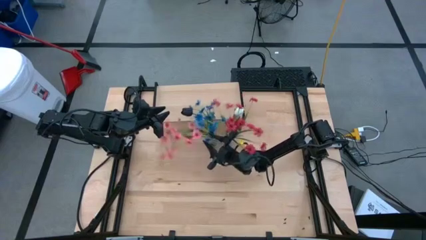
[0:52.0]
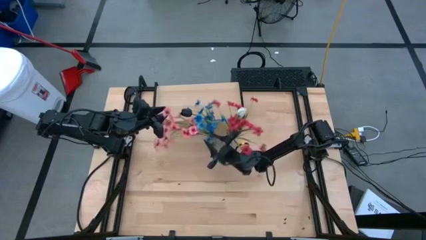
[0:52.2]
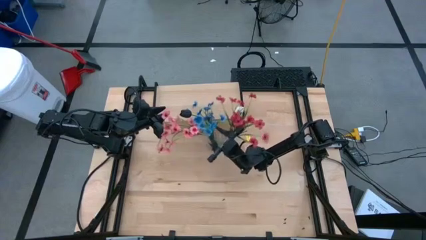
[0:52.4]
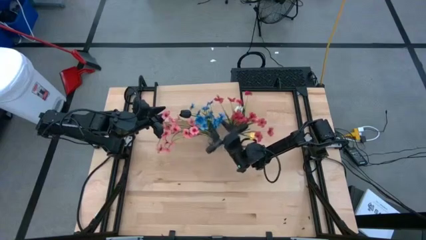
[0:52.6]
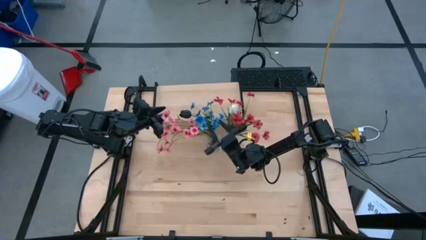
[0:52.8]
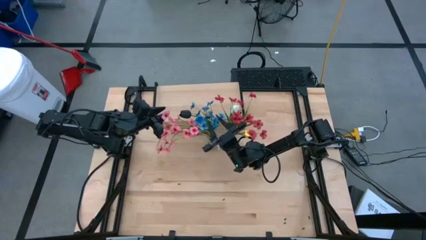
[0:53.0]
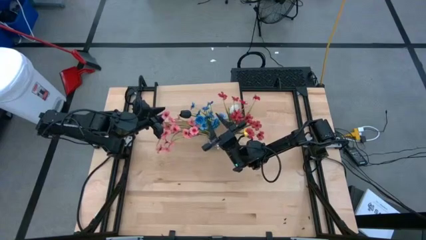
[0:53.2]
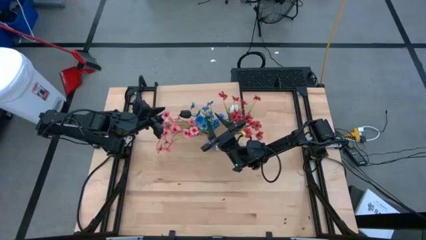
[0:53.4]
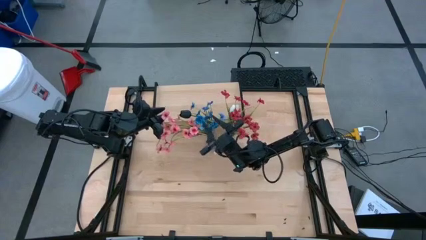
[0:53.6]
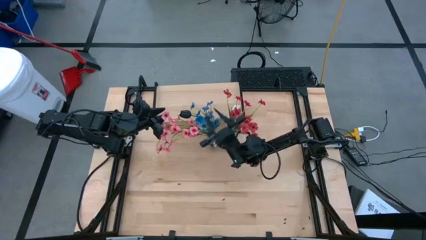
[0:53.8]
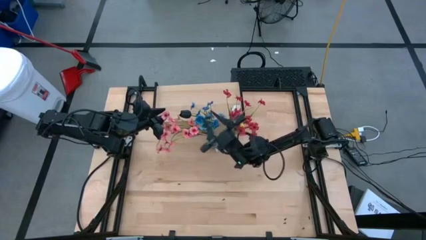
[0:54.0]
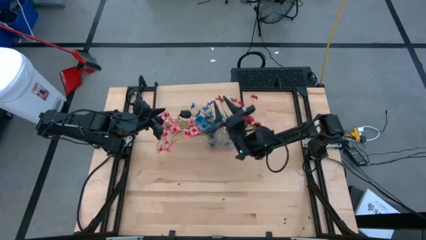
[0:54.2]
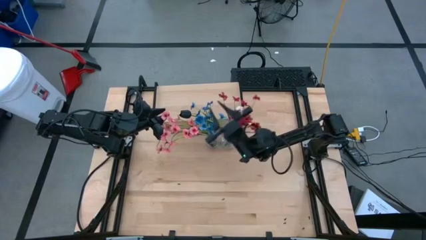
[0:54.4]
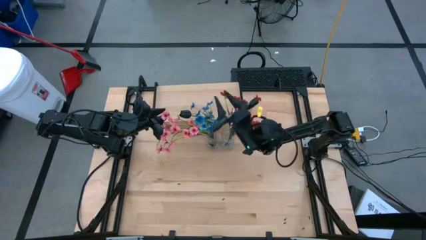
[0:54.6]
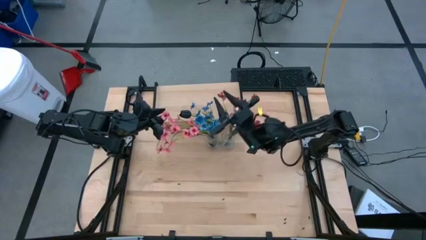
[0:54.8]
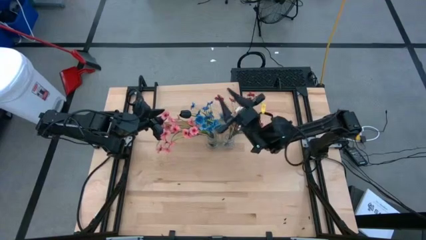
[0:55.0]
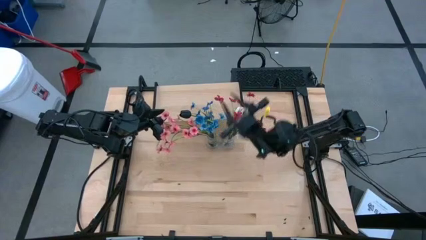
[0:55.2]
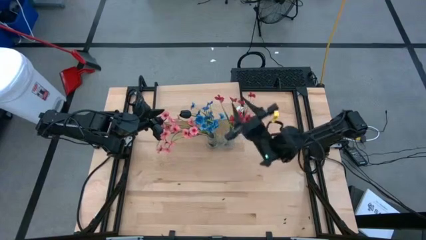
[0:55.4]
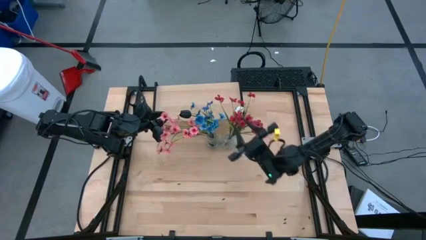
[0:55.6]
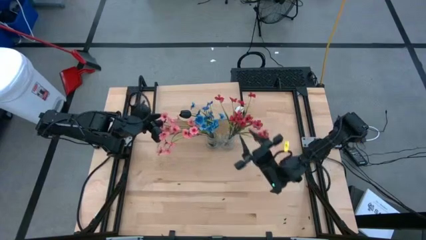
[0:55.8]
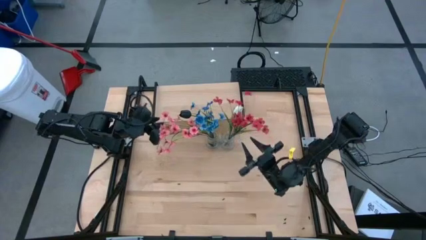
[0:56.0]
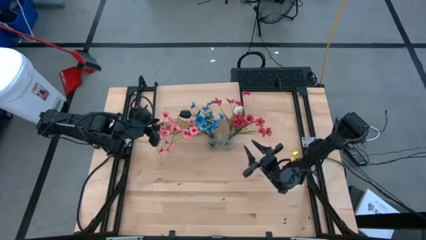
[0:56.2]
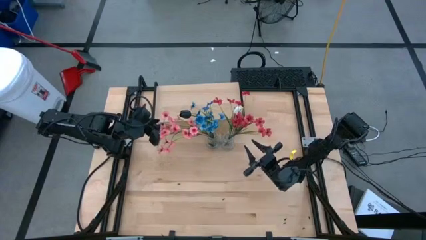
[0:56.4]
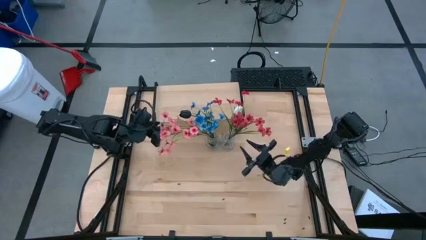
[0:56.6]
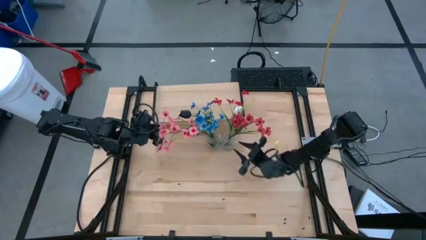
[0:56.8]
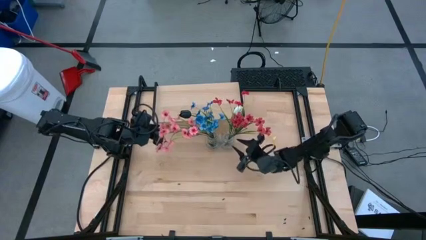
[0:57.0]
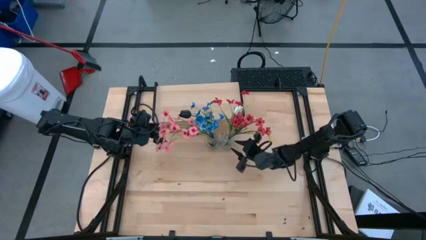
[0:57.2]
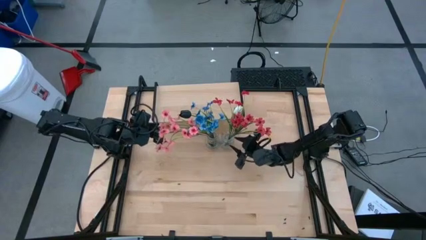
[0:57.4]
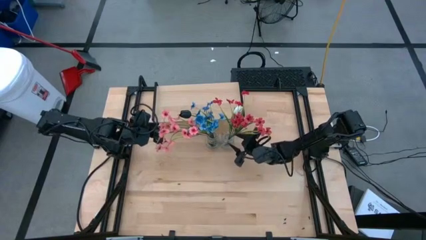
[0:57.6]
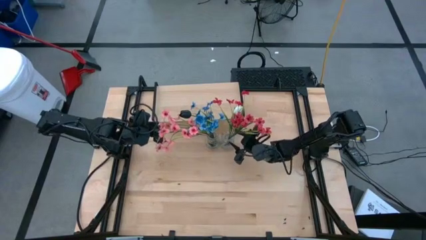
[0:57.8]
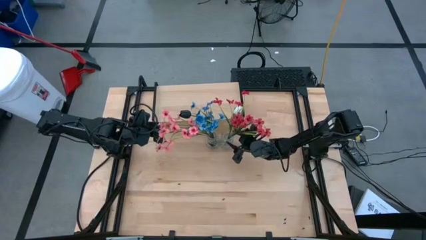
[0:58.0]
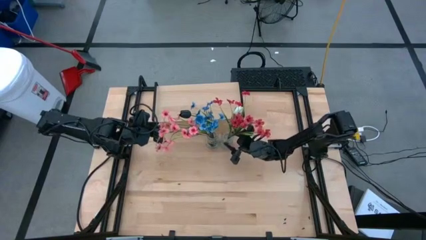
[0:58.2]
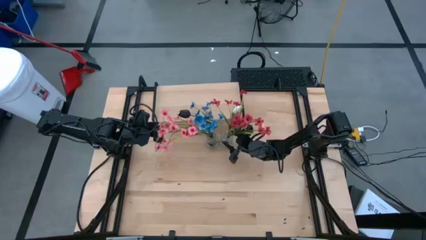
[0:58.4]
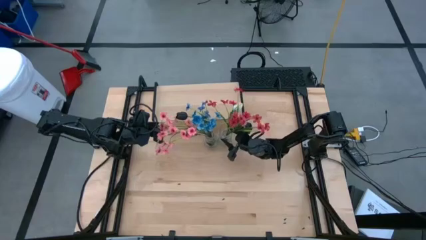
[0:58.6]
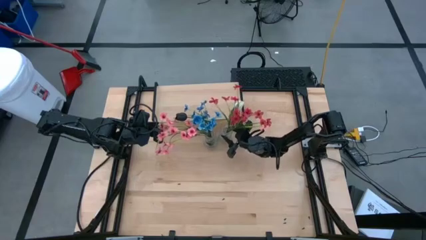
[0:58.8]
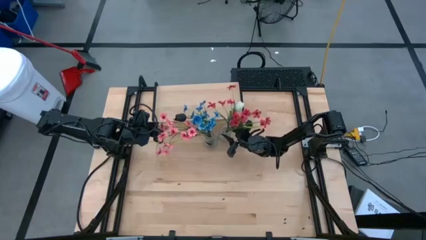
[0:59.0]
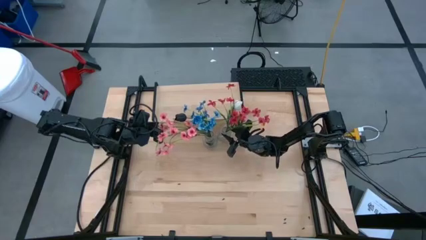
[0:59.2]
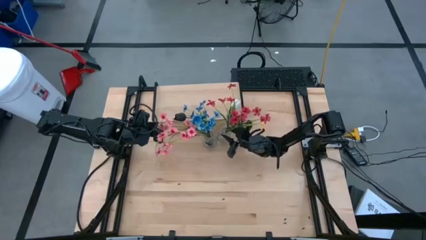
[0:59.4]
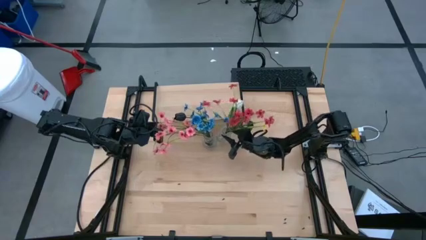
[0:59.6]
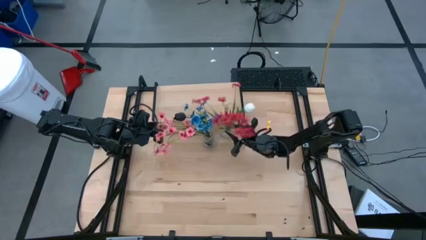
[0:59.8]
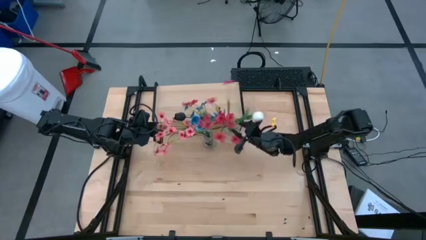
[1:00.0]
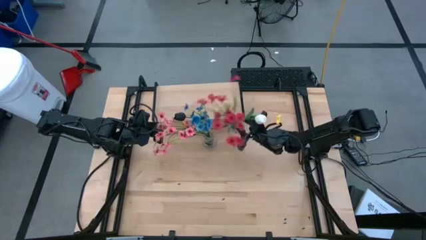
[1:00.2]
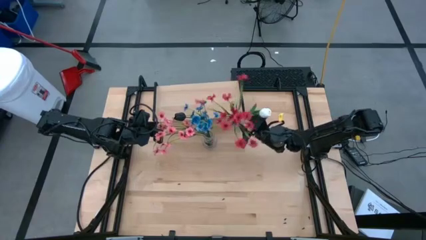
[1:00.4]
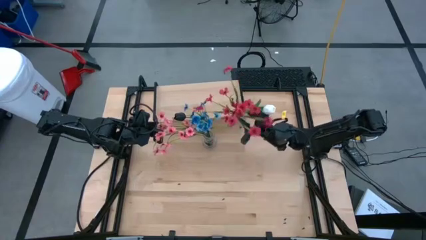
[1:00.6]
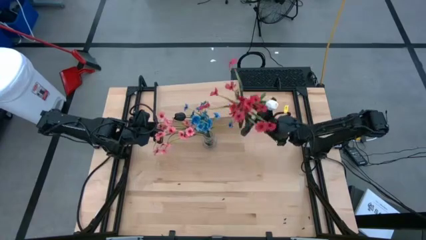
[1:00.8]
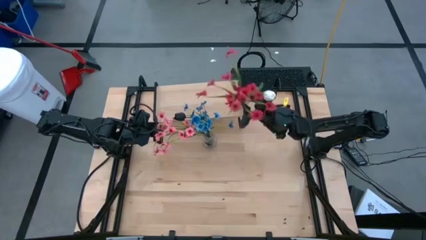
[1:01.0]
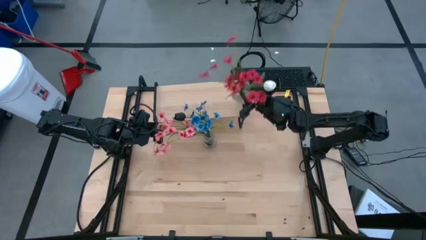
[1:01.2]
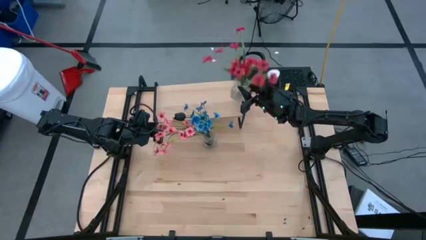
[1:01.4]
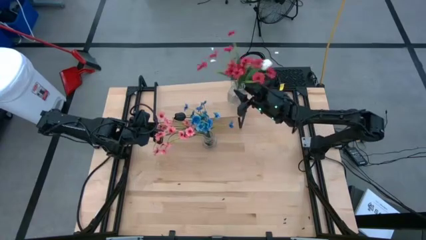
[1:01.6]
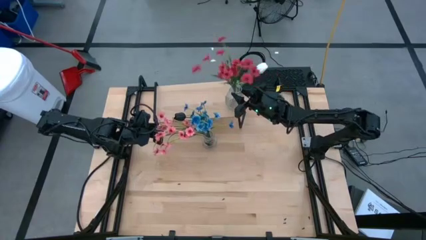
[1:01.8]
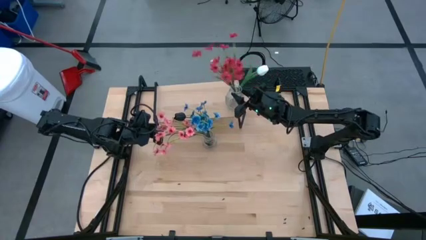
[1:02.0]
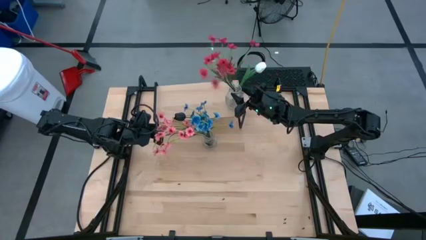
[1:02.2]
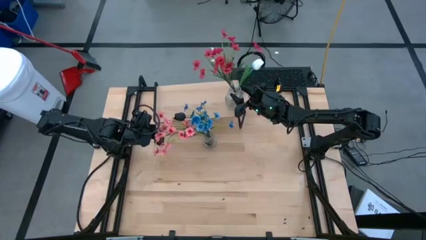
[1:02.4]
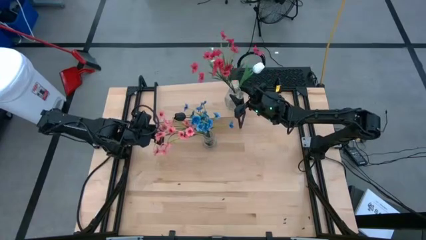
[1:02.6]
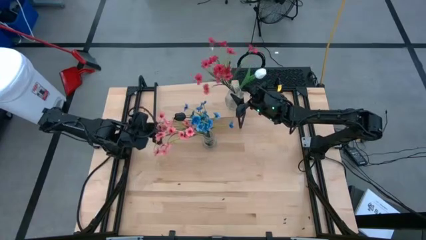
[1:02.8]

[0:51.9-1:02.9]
Task: Pick and place flowers into a vace then onto a shelf
Put the right transparent vase on the shelf

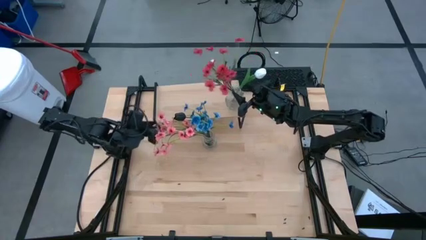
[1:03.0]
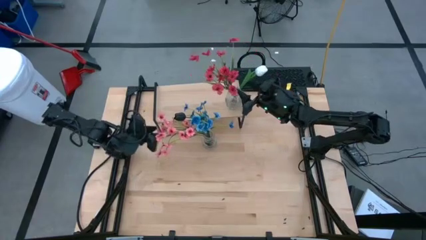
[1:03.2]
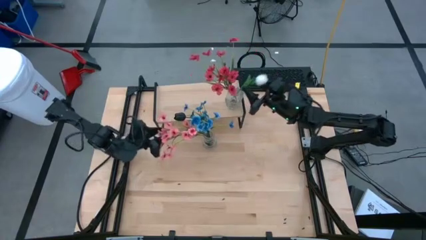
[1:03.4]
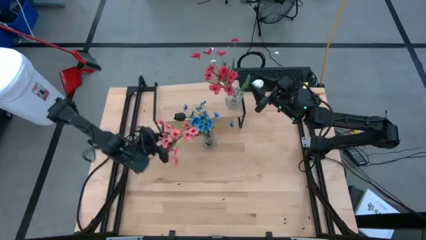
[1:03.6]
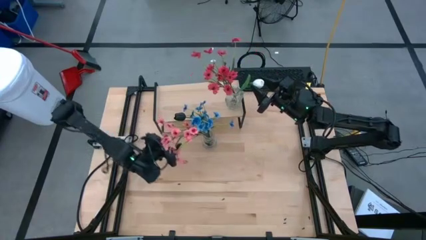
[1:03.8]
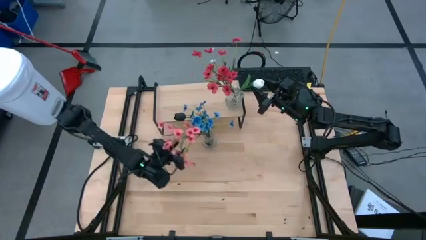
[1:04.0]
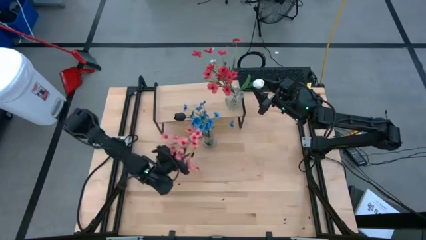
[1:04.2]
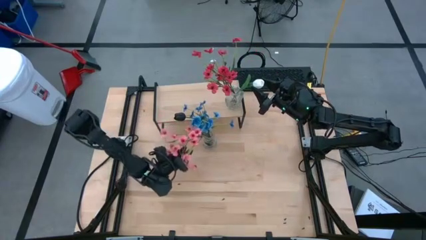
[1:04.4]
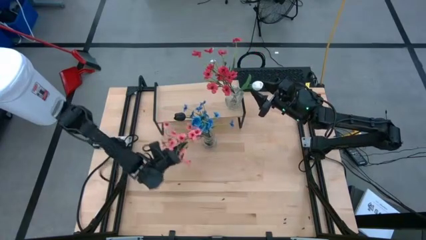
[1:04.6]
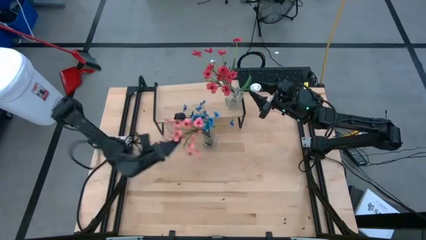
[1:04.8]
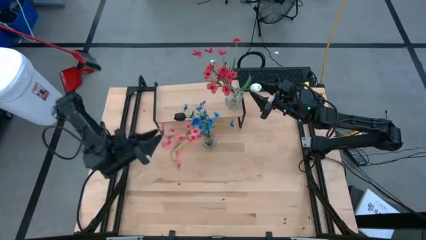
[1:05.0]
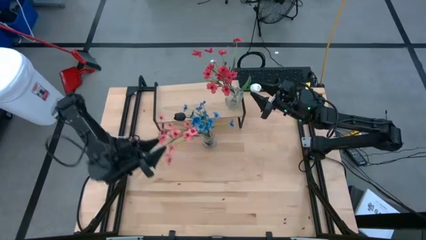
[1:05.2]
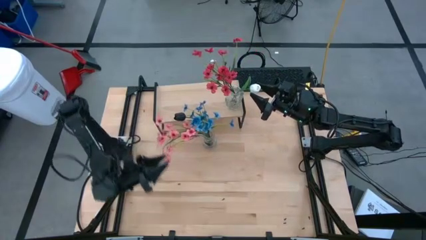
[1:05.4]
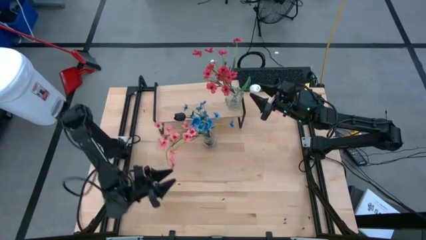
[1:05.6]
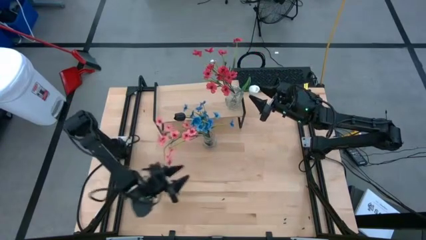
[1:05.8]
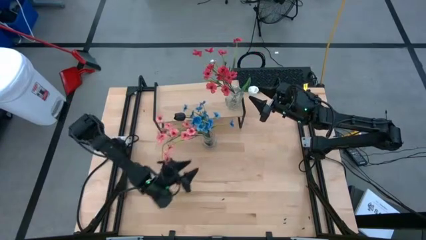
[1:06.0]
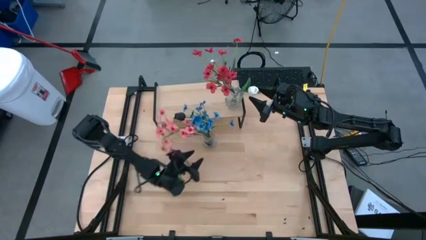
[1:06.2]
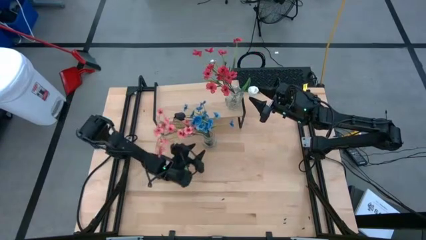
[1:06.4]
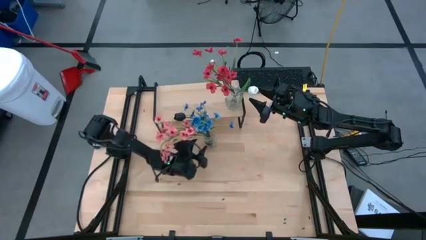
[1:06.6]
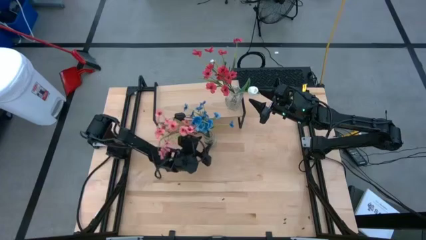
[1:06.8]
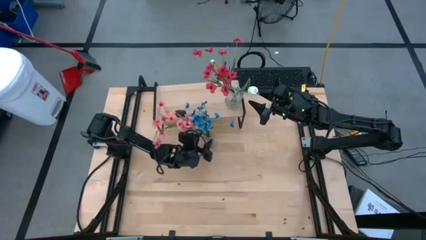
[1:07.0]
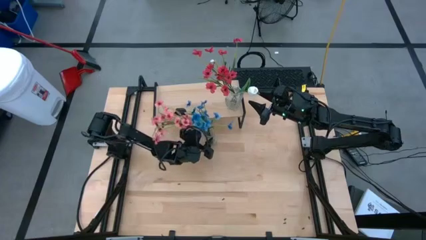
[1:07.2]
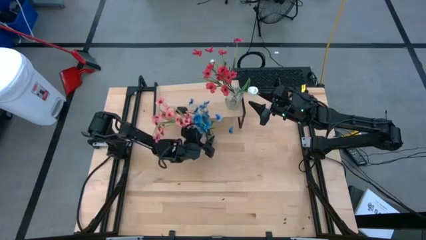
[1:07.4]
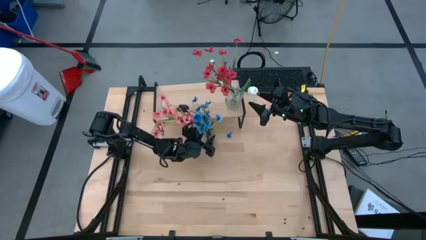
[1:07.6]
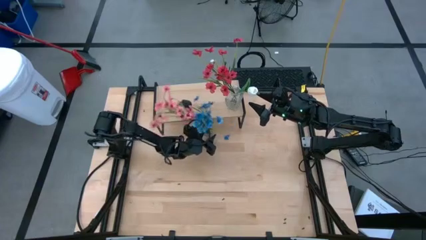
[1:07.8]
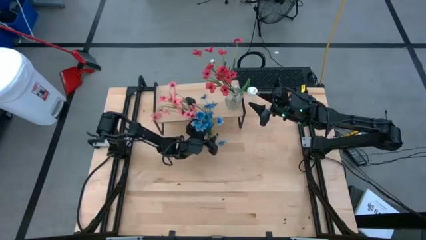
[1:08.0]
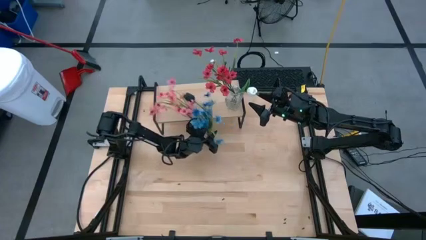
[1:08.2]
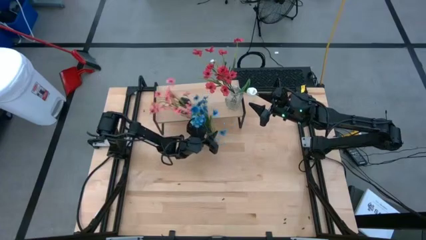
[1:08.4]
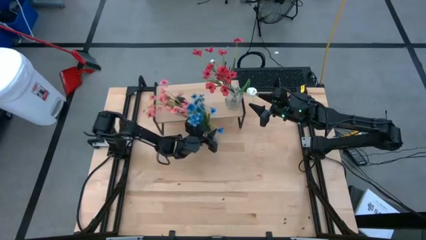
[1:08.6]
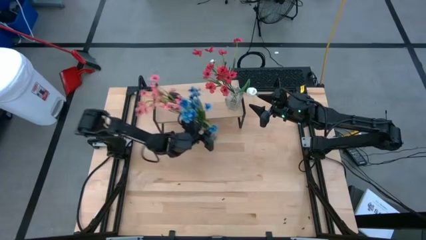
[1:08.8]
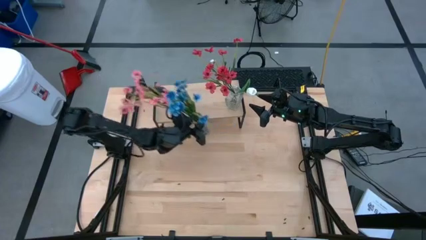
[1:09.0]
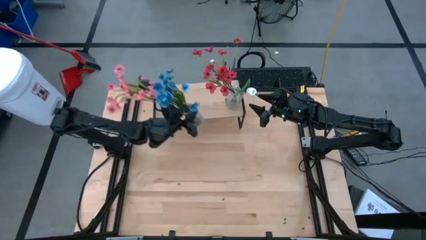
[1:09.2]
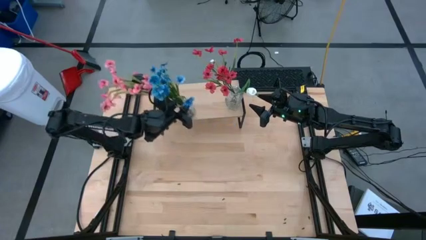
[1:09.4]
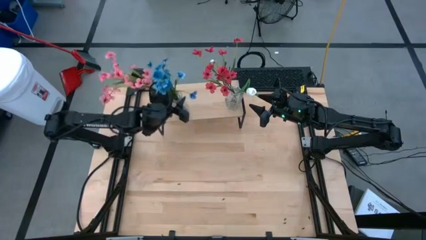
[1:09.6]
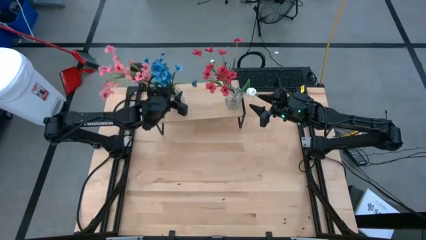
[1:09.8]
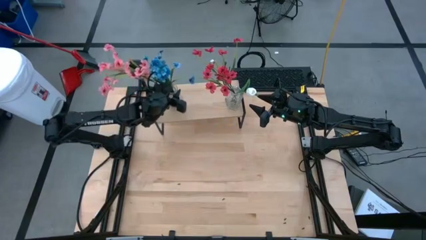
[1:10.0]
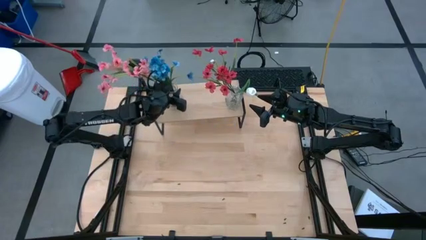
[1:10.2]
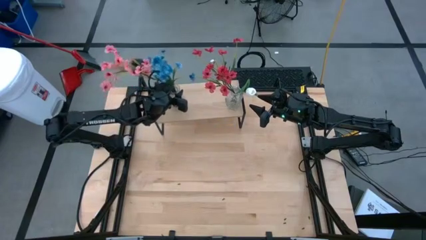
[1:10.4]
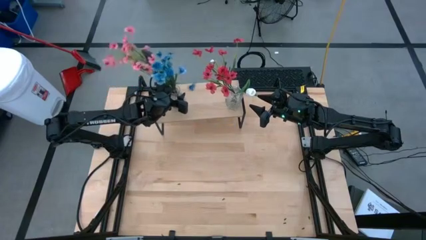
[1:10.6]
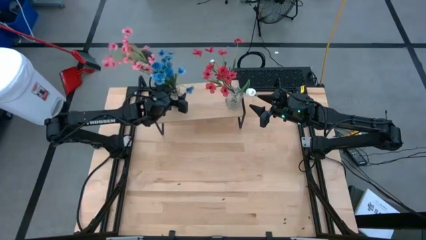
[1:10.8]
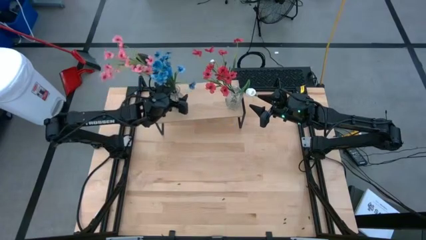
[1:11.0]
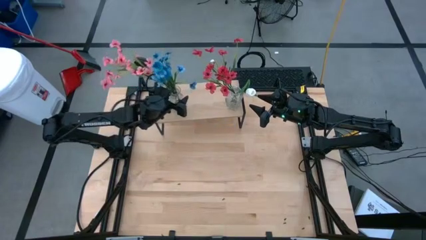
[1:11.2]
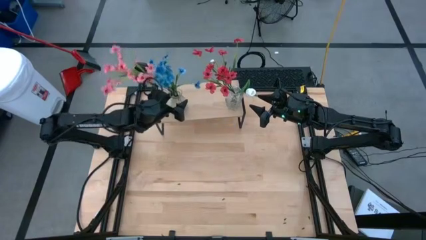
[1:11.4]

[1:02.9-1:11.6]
Put the transparent vase on the shelf
